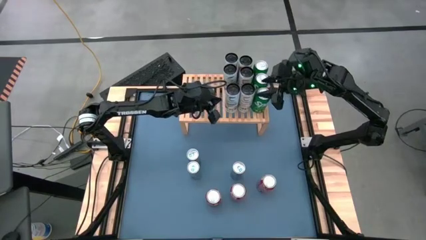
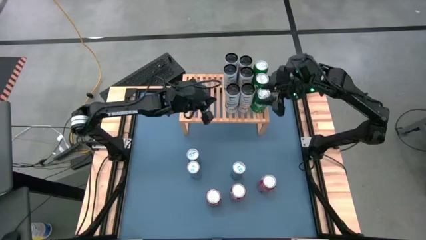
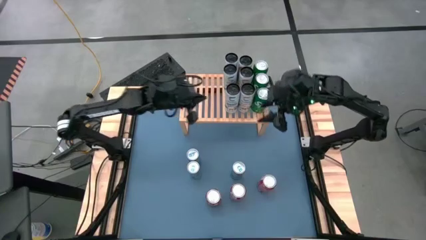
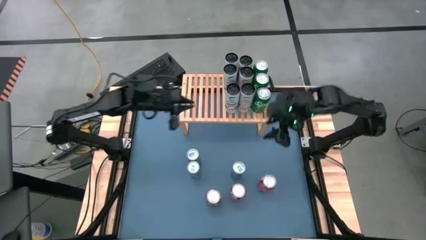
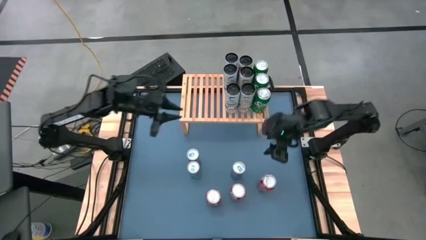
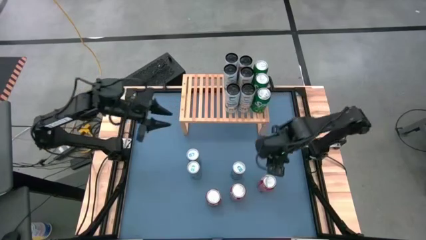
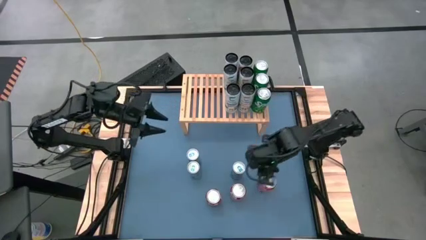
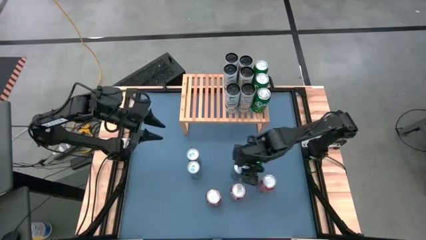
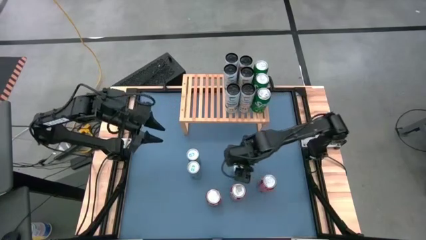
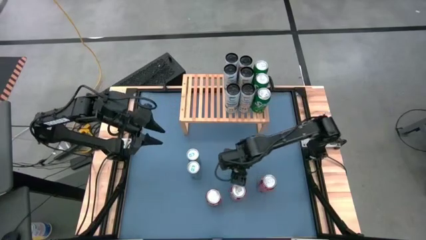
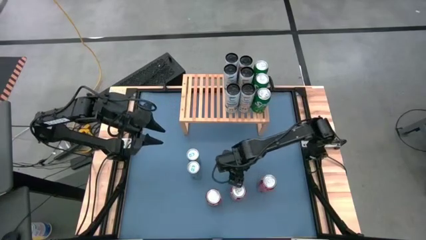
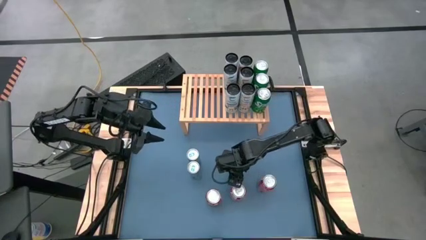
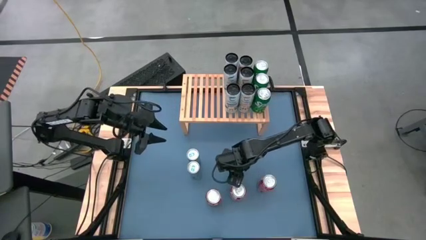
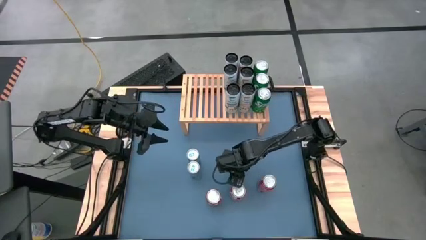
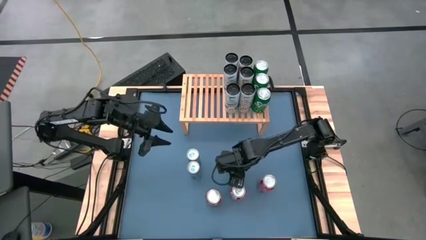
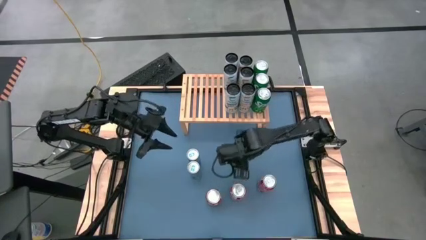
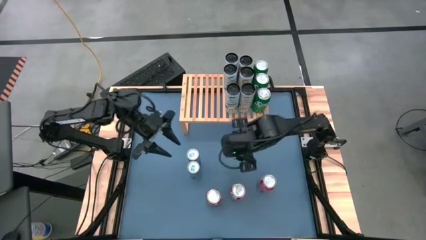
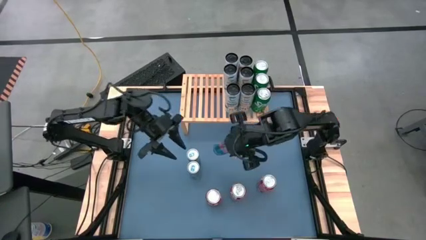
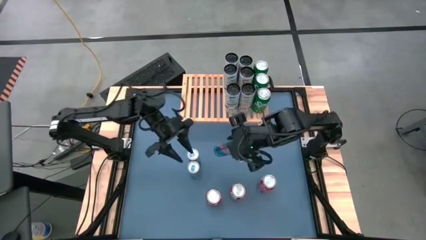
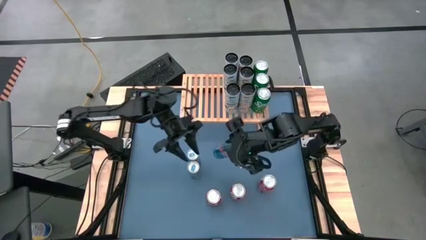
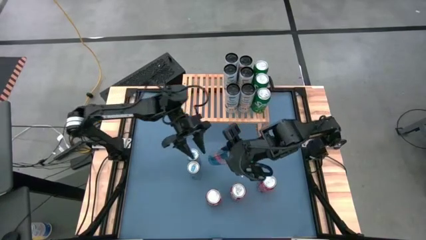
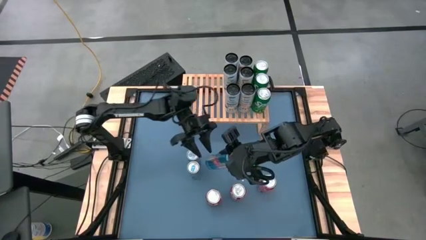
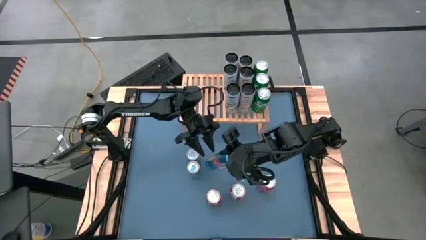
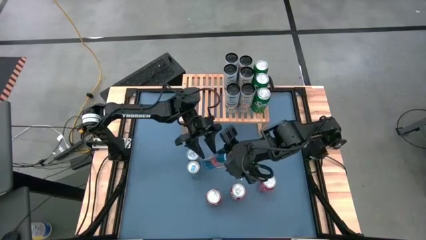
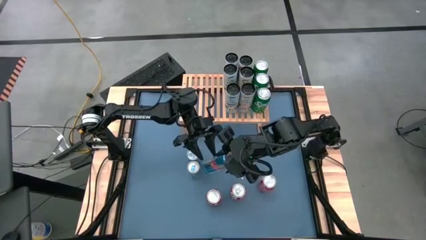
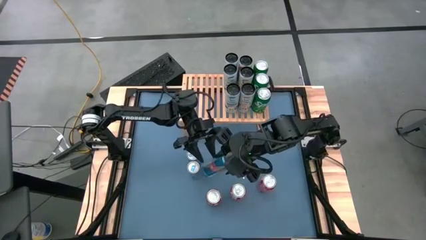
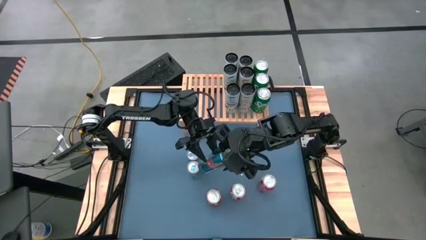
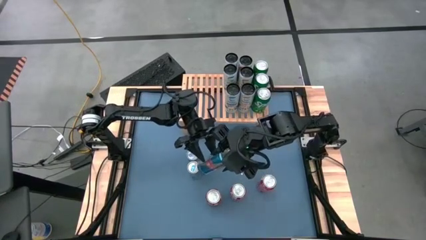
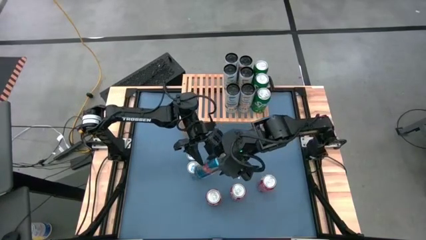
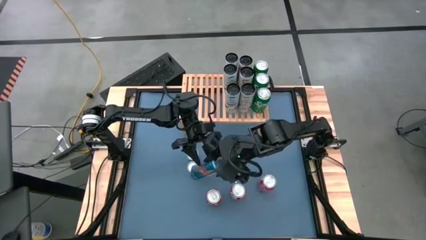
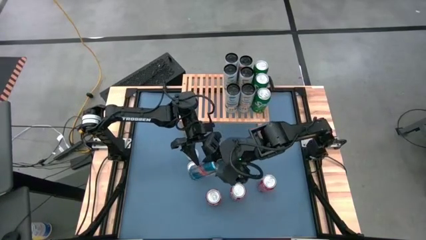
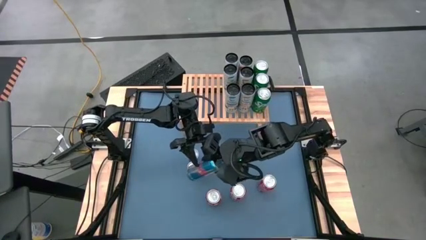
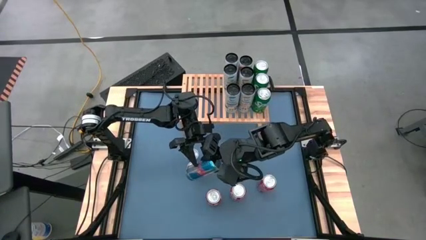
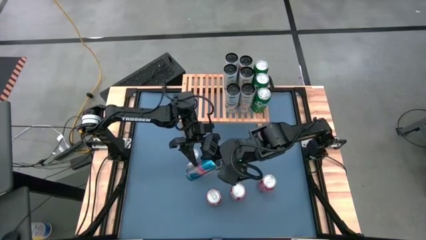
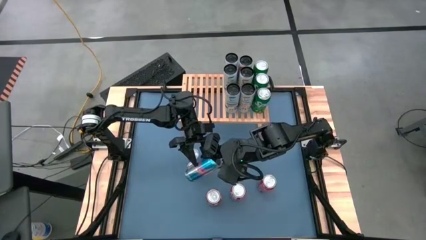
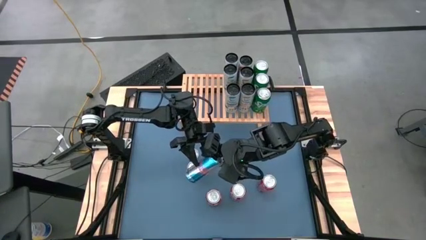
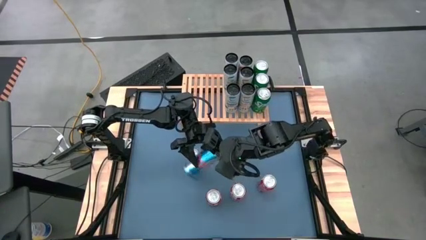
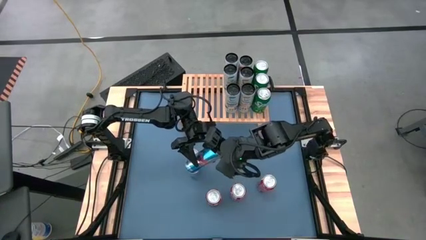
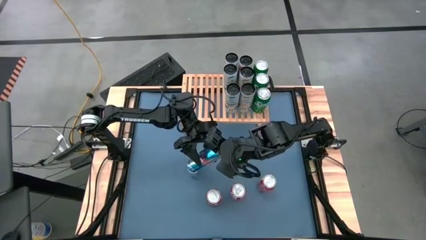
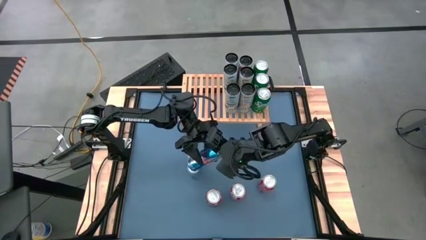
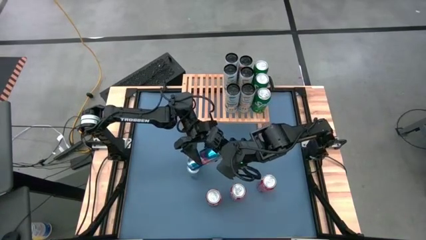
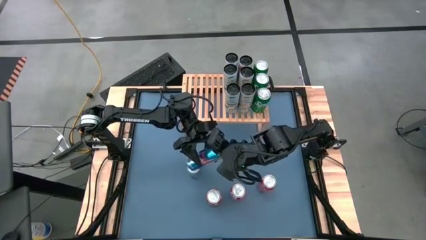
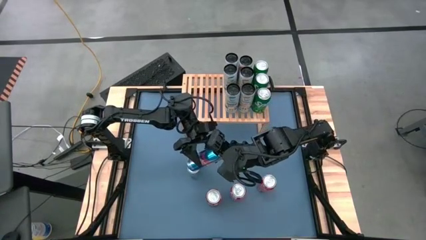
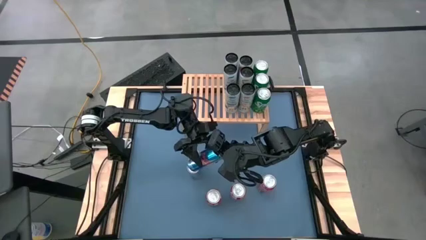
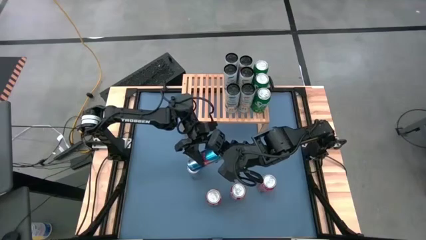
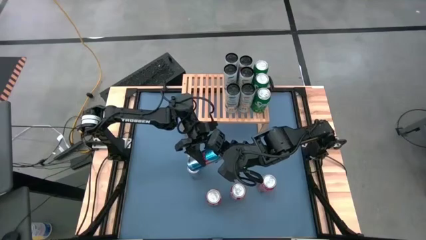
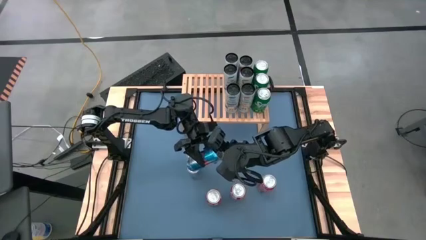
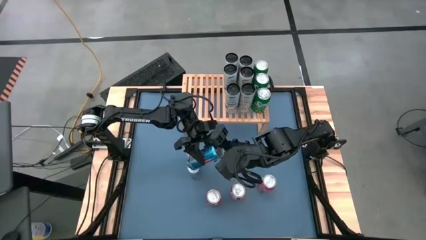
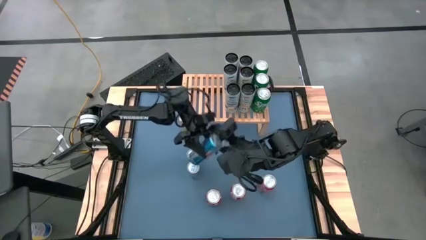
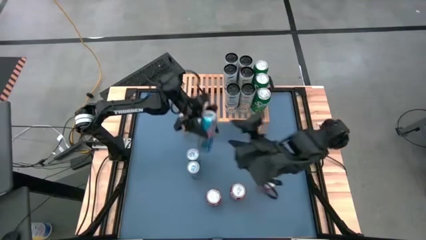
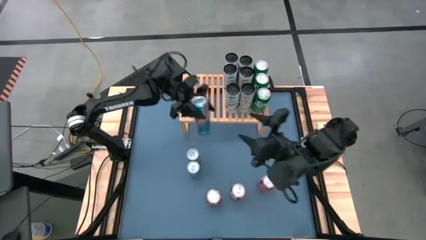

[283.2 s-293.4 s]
Task: Place canned beverage on shelf
Put the bottom right blue soda can on the shelf

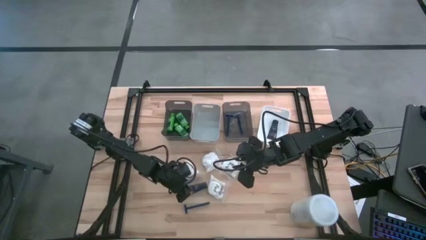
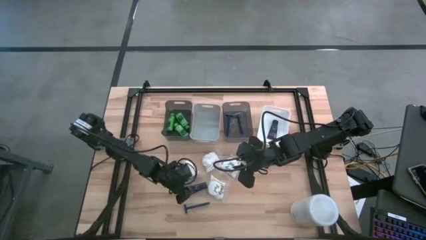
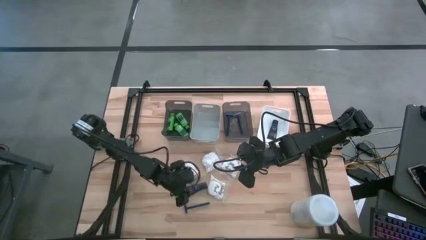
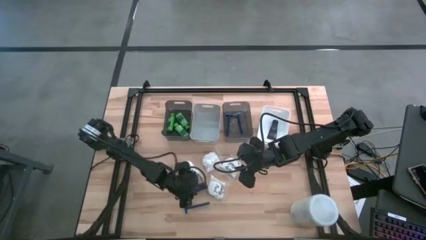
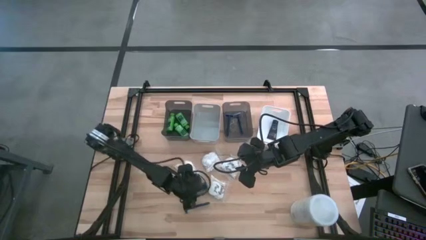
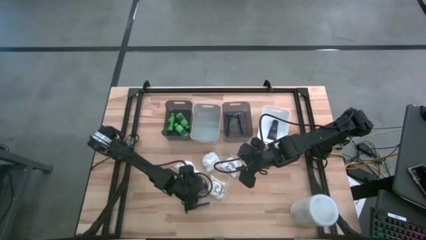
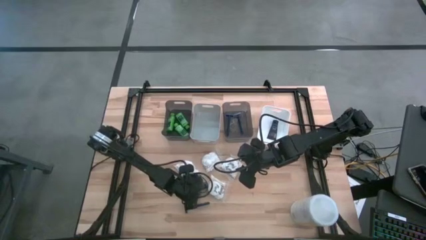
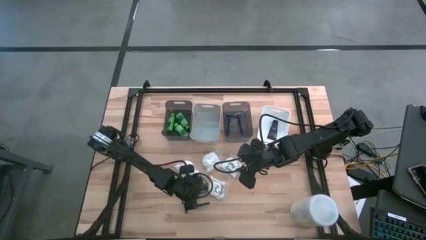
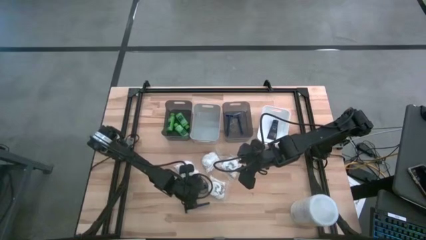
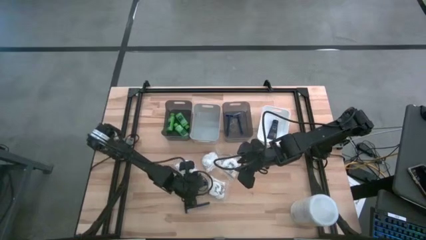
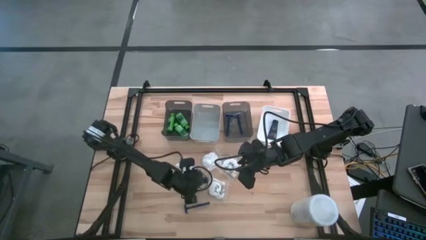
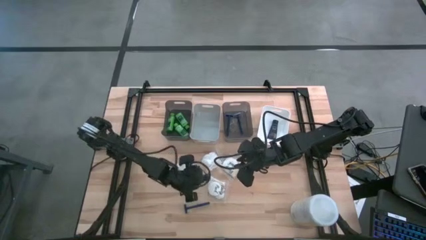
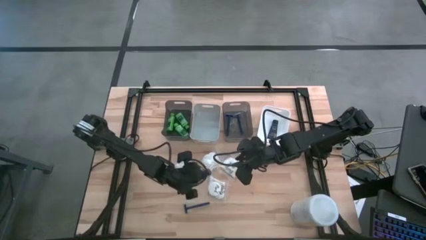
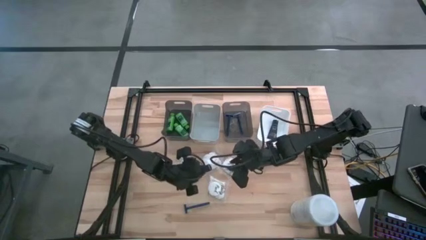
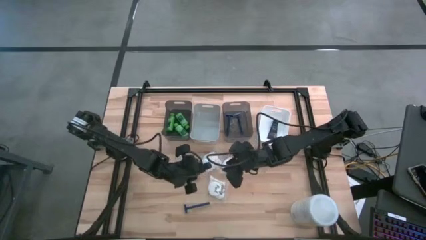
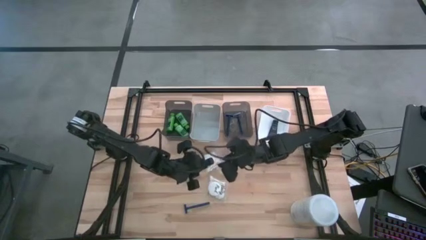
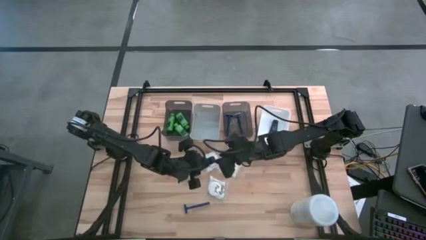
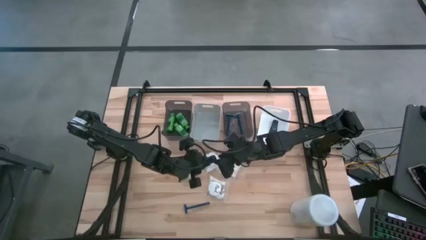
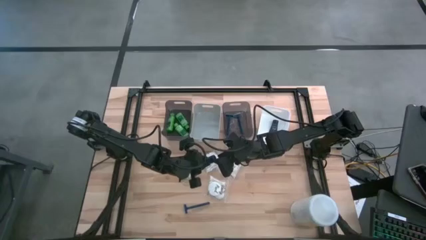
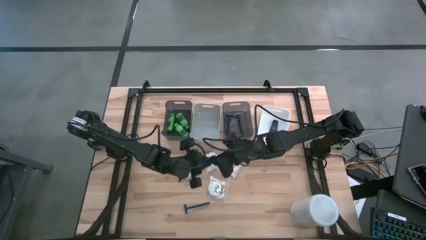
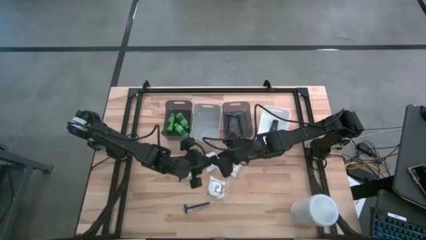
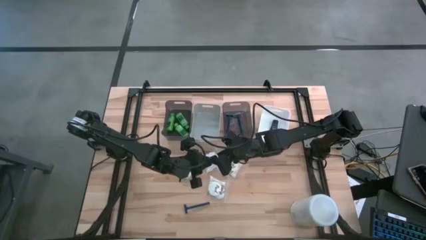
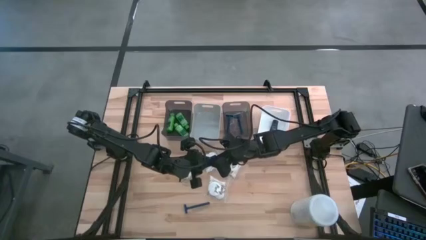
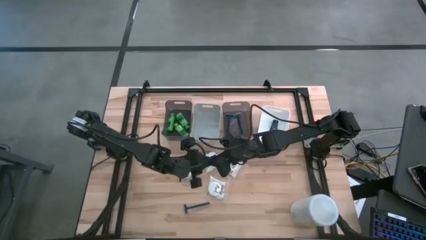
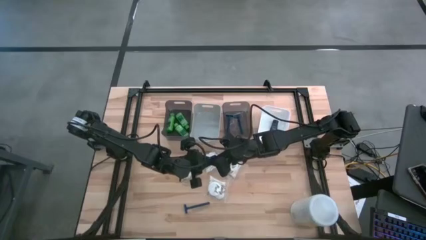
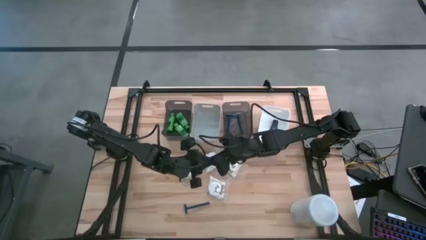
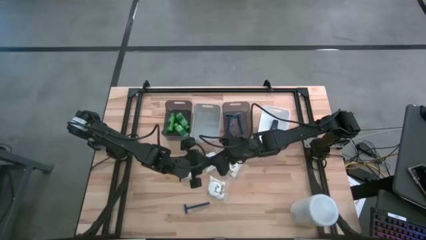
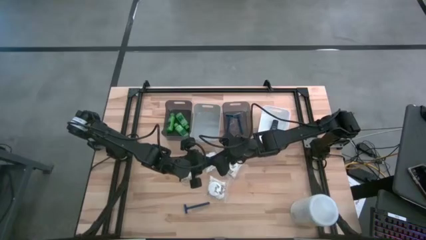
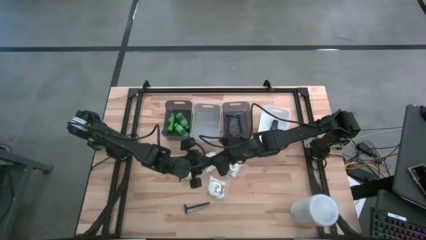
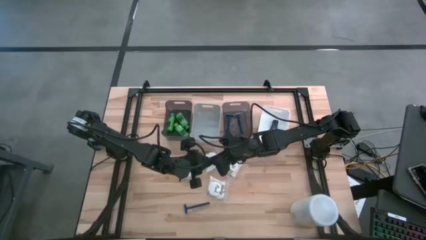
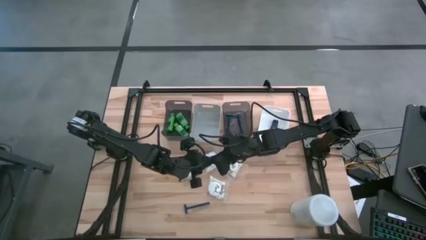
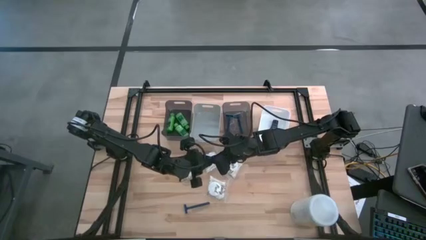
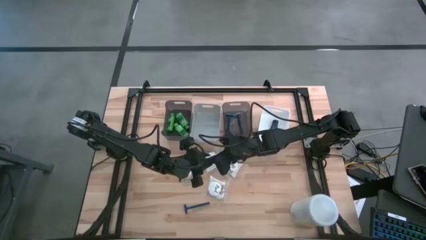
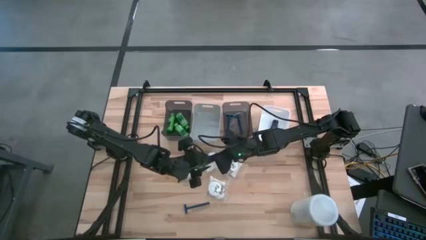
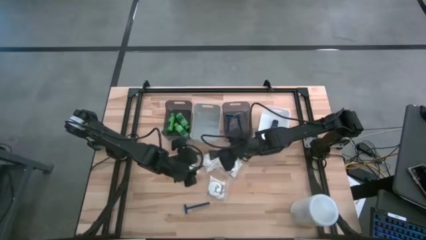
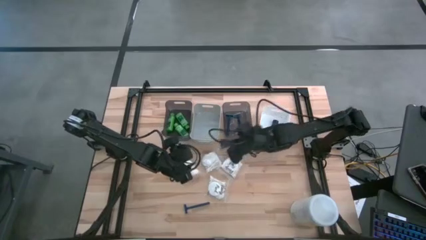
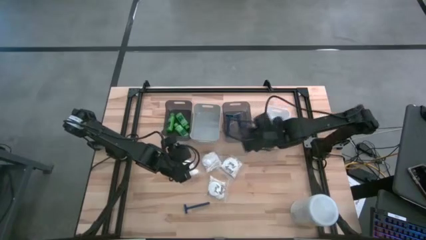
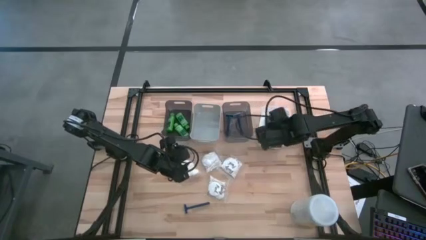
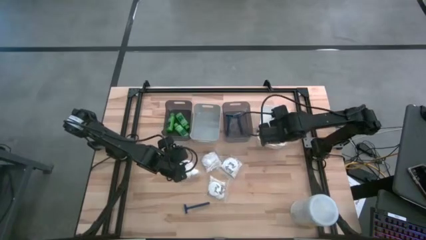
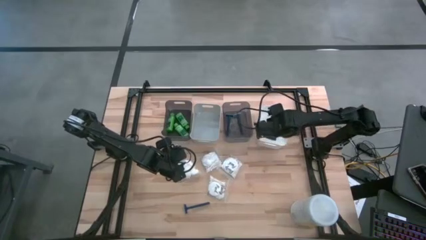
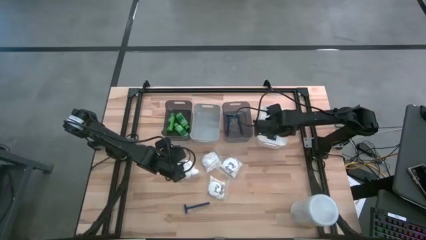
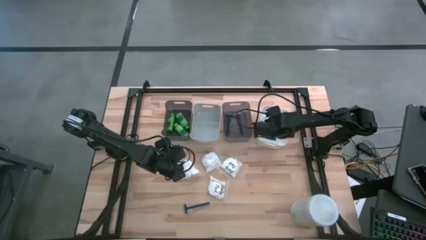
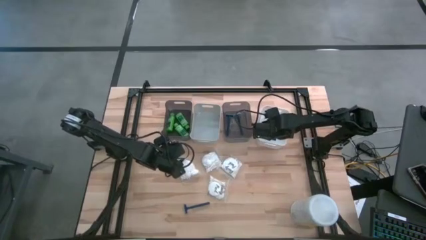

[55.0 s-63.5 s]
Task: Pick & Place Travel size toiletries
Put the blue shave cream into the white bin
